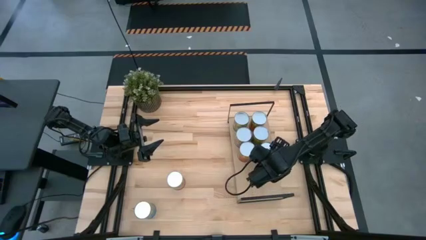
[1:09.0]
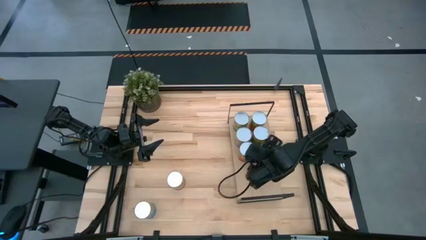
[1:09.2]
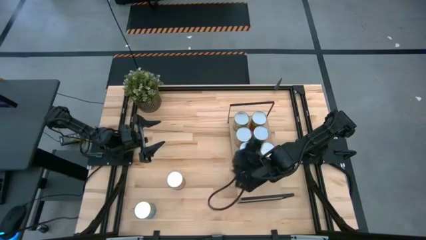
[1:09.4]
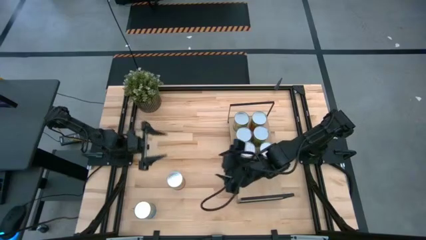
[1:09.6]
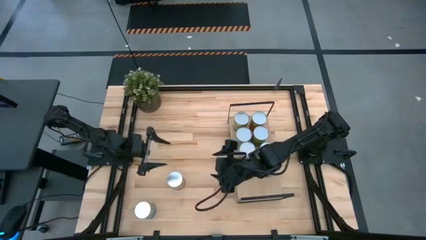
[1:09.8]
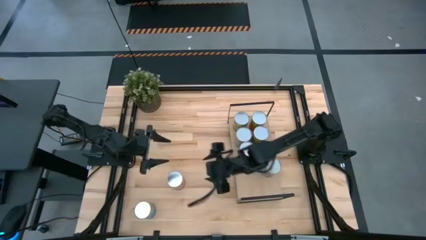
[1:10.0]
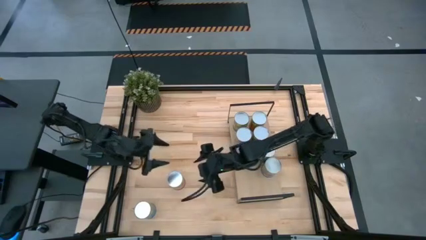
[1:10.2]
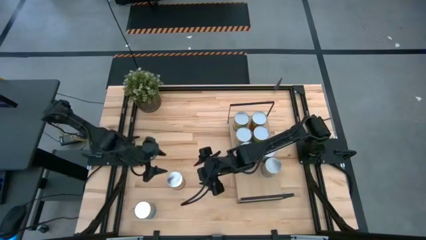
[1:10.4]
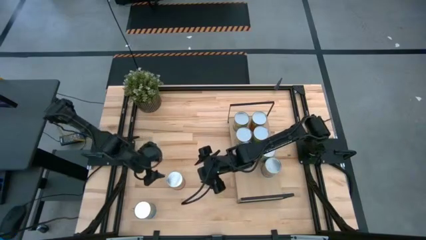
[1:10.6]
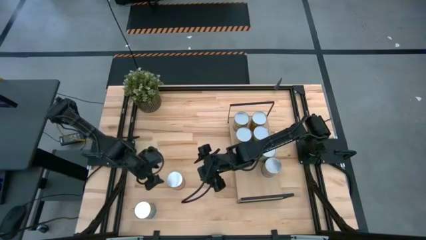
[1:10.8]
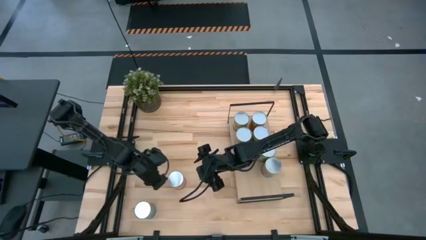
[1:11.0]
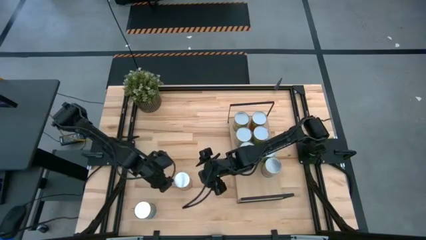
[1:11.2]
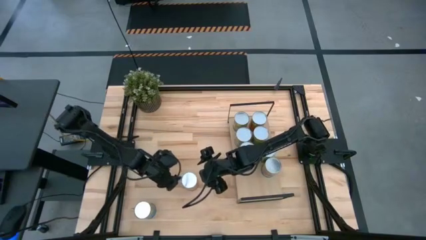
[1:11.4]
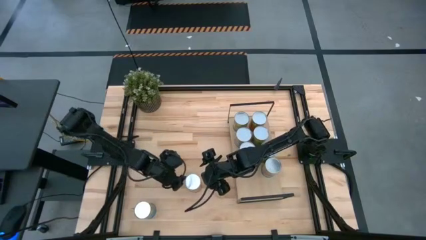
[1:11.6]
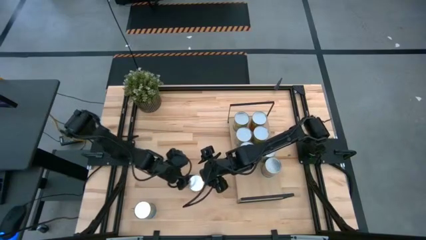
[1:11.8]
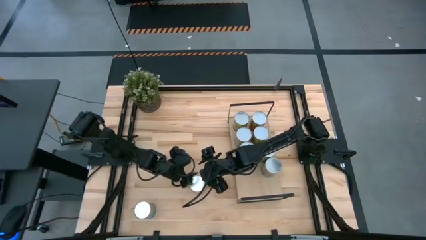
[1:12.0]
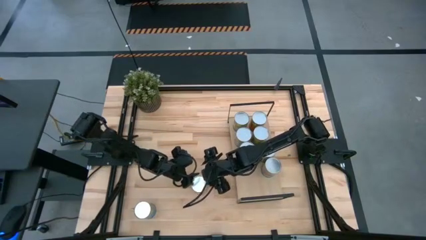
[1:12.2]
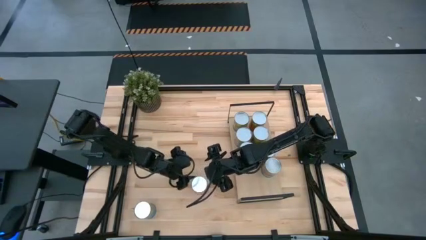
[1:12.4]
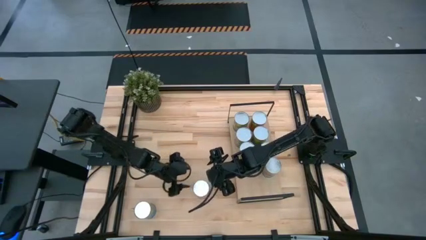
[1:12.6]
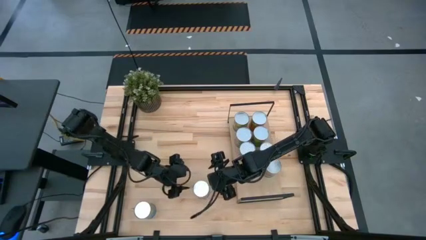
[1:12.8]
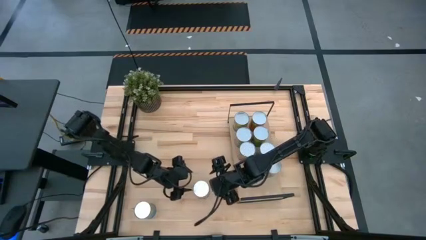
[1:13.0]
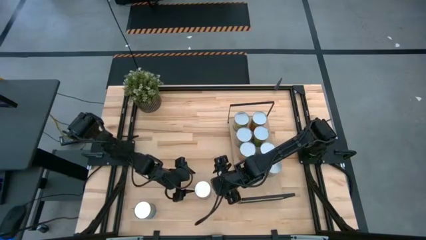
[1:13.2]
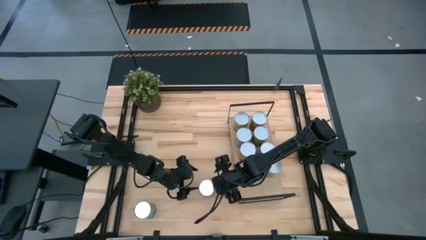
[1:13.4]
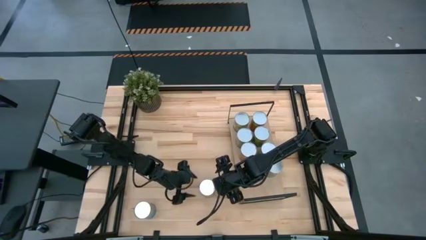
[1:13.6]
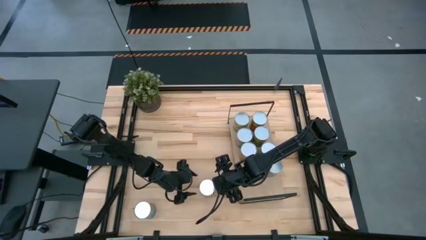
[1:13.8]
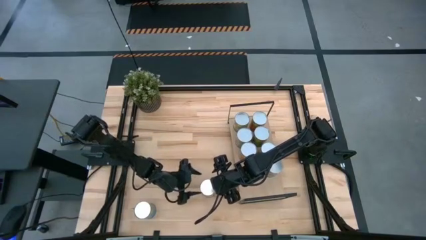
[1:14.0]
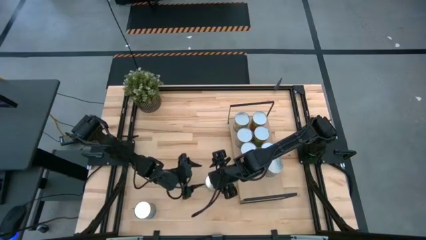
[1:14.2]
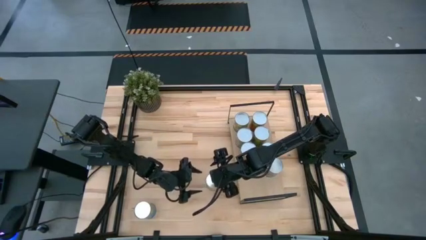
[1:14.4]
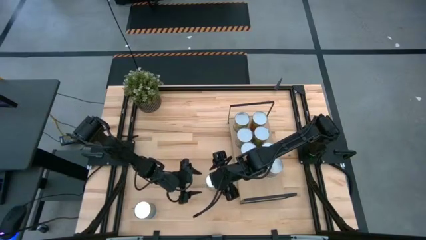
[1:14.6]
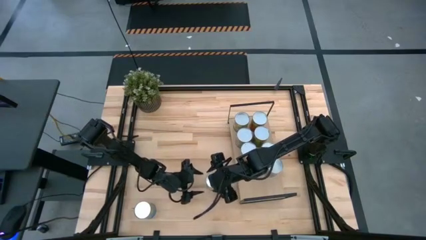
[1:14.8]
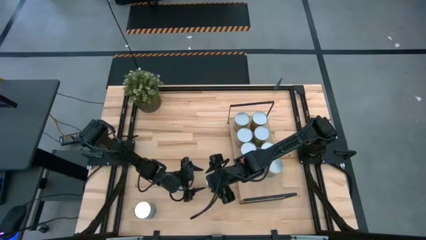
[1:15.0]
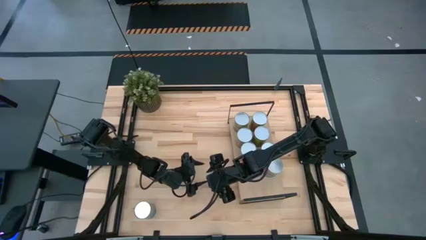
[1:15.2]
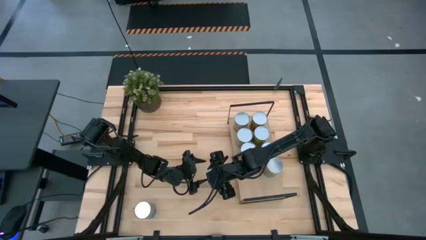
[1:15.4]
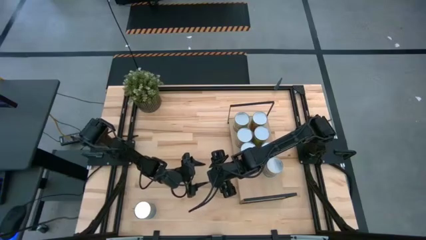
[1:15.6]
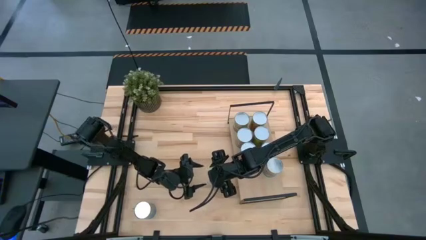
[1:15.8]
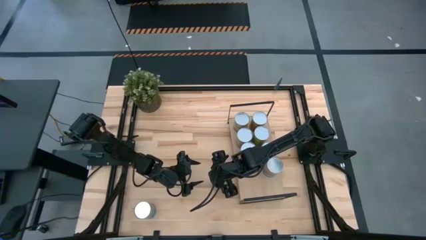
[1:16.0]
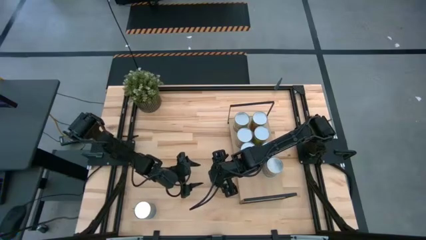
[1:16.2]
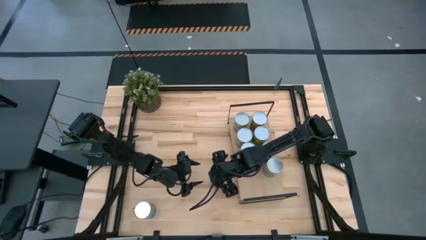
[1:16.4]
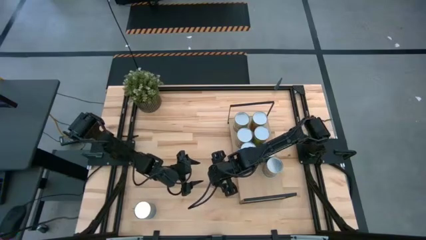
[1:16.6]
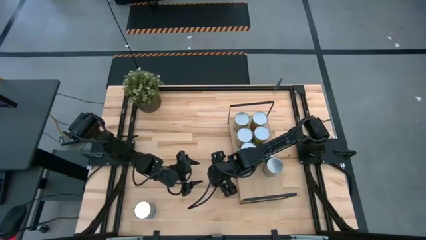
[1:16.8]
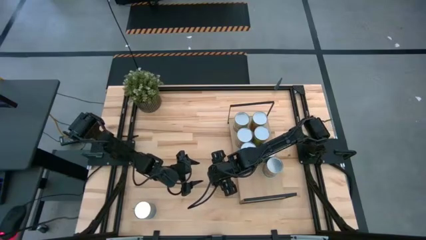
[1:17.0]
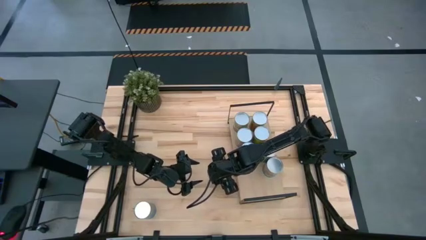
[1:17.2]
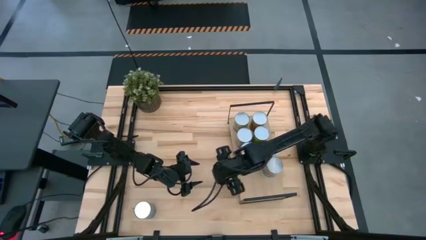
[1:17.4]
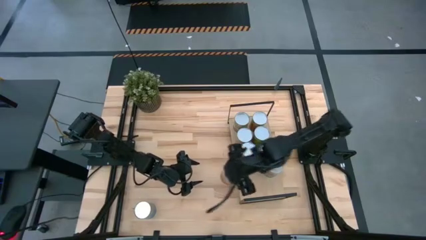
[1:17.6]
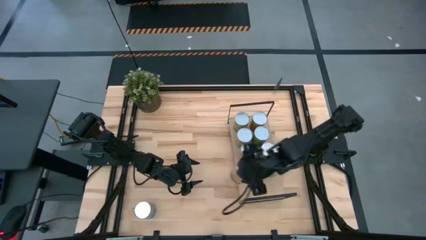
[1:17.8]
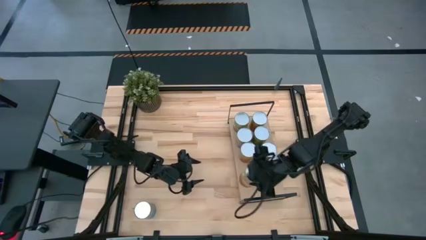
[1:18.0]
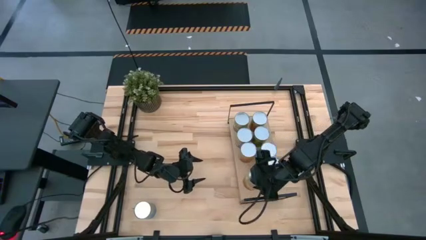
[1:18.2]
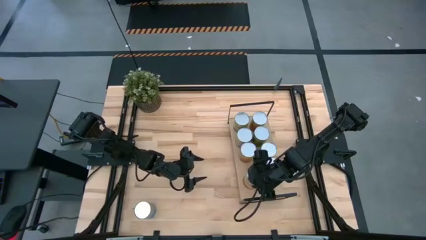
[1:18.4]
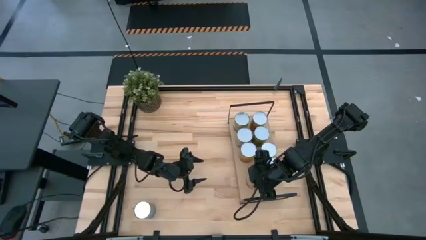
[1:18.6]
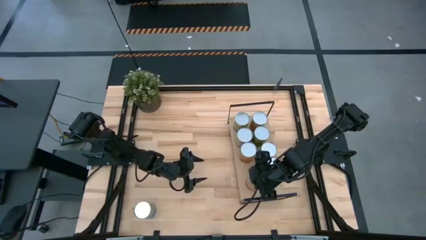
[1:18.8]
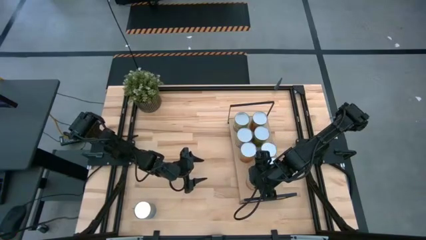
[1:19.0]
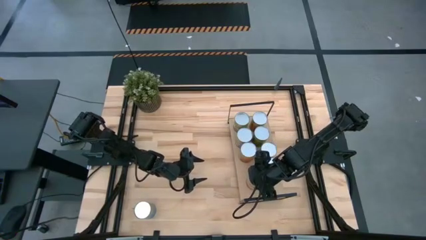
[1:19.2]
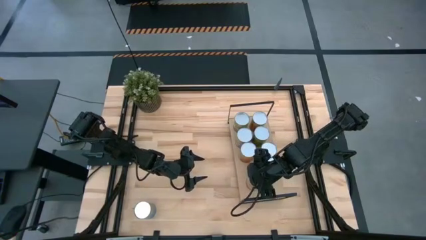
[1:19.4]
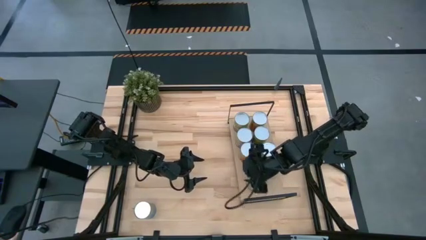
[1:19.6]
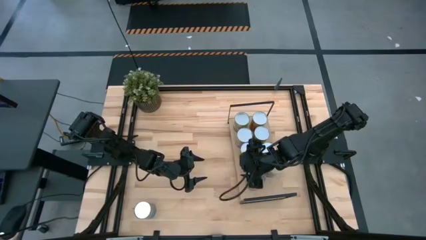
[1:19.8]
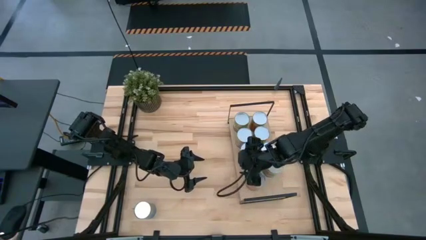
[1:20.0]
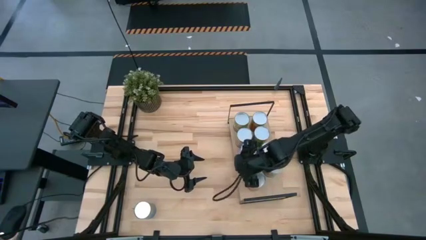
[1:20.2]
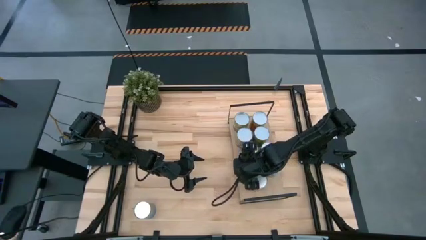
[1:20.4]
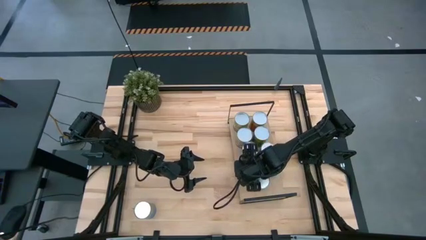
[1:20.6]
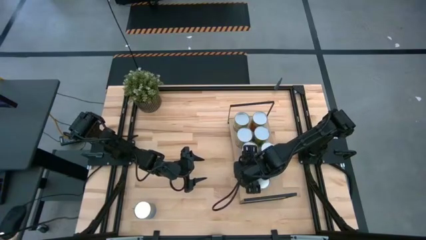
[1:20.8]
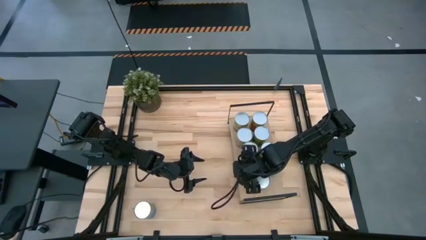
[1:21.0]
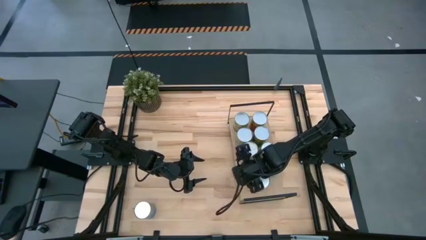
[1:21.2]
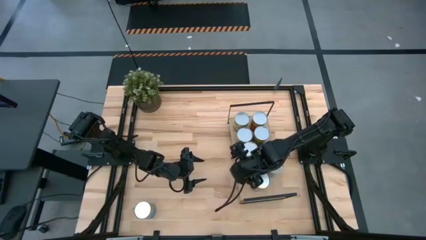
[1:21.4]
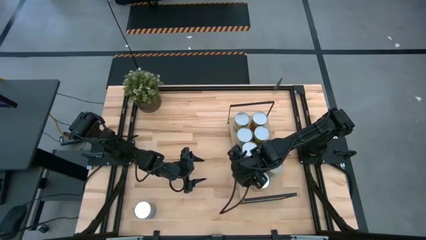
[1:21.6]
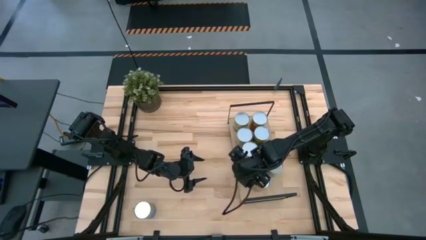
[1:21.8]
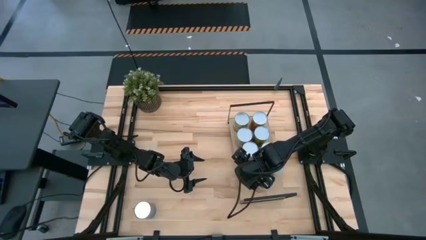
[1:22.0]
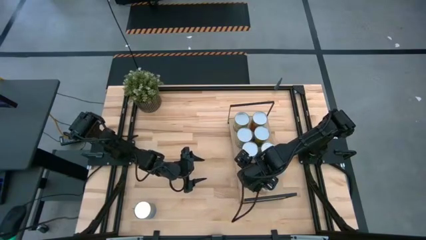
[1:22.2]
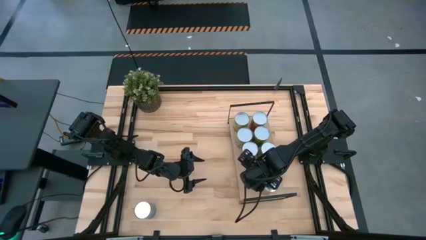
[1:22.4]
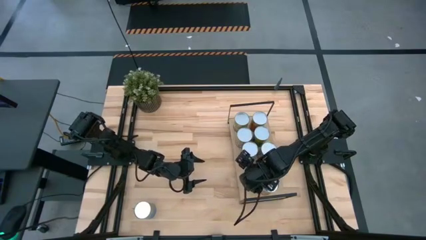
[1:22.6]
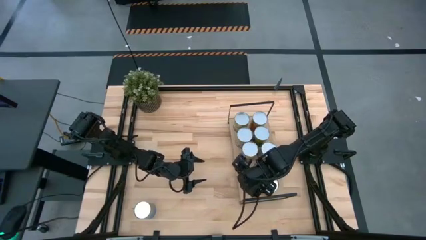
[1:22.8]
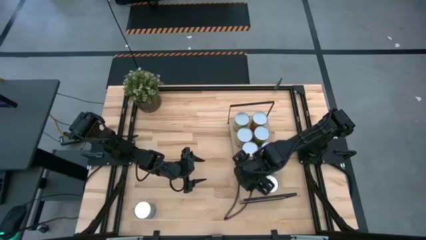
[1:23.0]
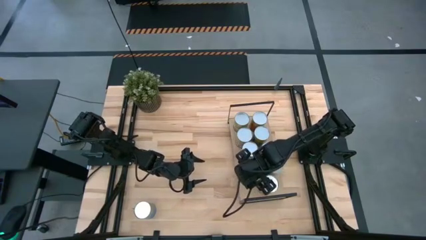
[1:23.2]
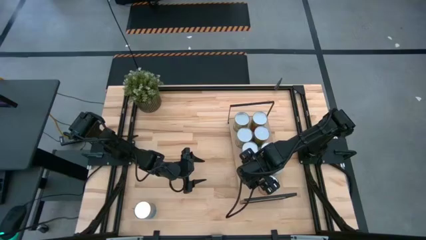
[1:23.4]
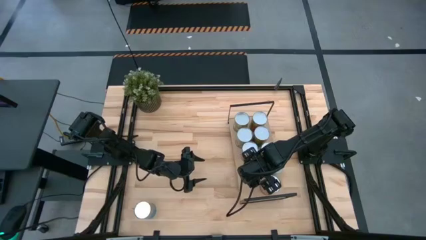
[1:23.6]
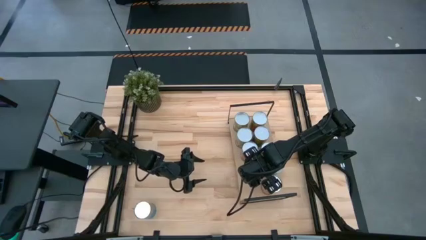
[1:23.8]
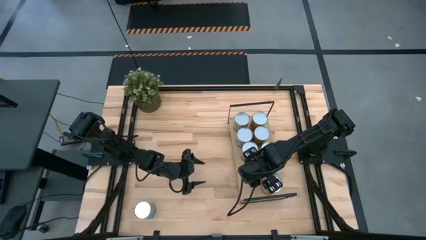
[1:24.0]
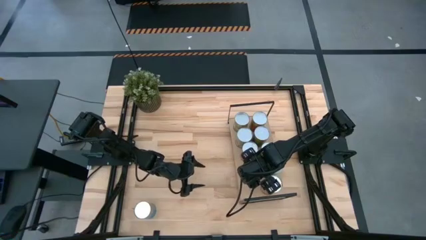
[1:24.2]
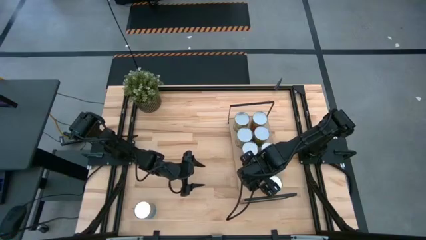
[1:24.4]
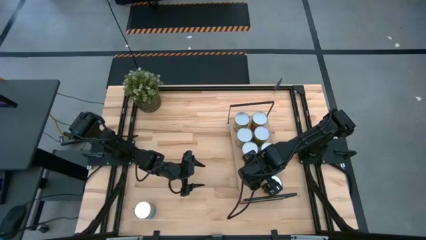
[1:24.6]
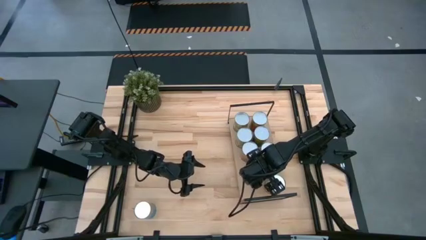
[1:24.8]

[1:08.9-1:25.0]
Task: Pick and place cans onto a shelf
Put the canned corn on the shelf
